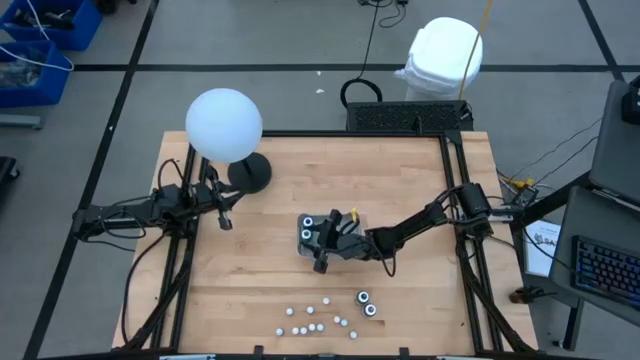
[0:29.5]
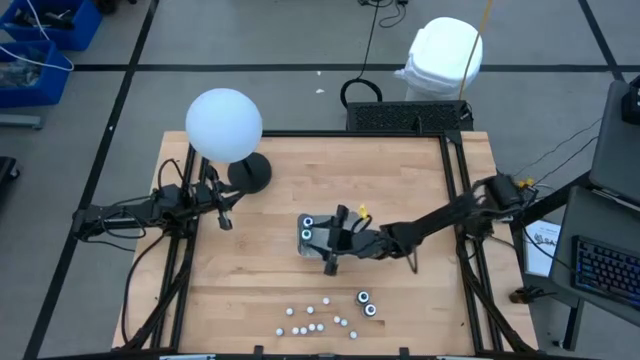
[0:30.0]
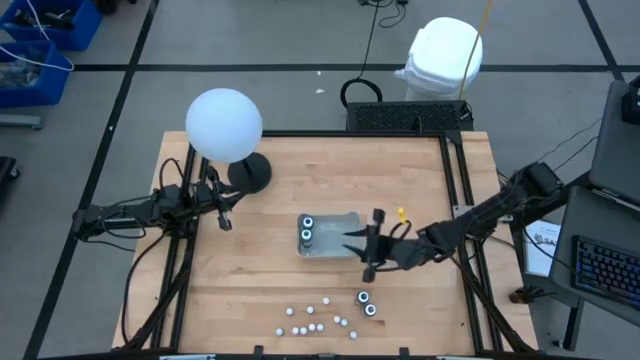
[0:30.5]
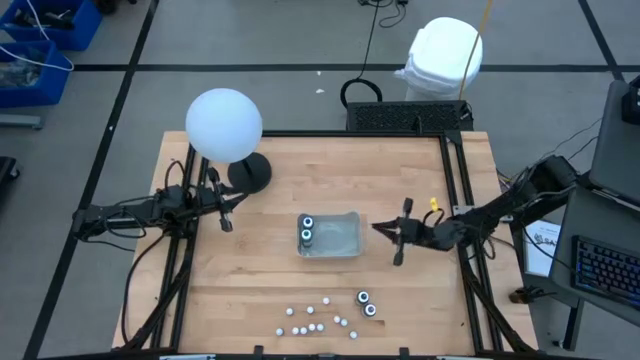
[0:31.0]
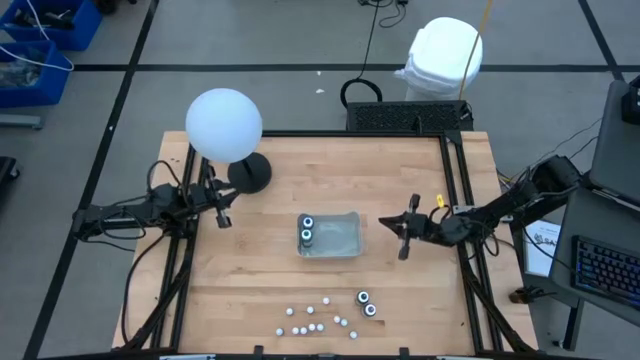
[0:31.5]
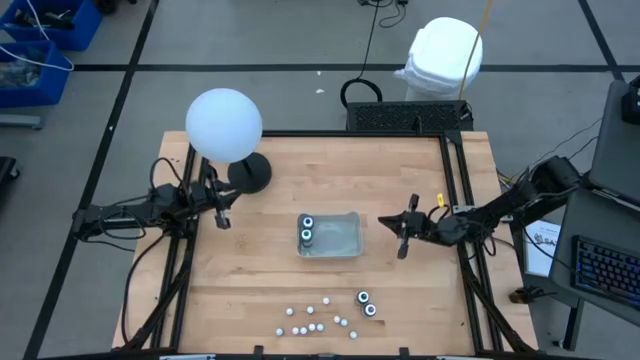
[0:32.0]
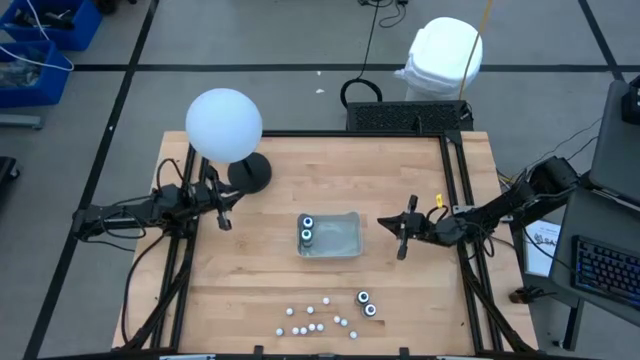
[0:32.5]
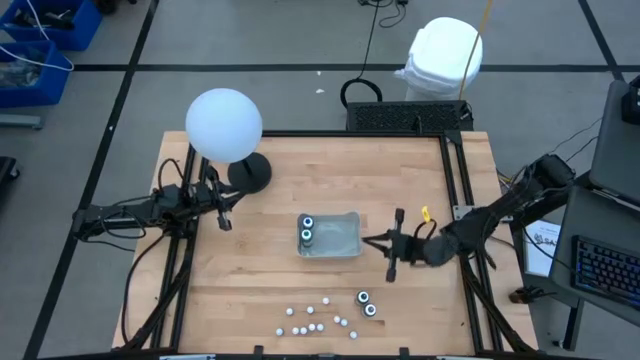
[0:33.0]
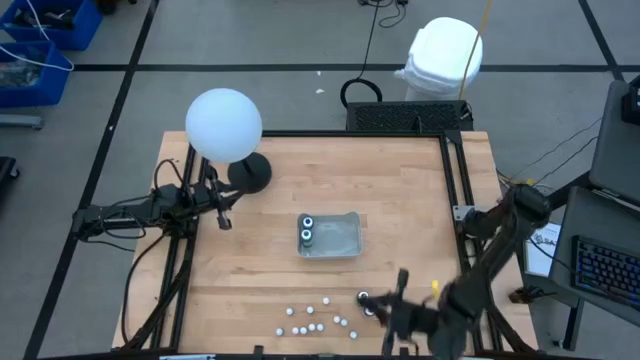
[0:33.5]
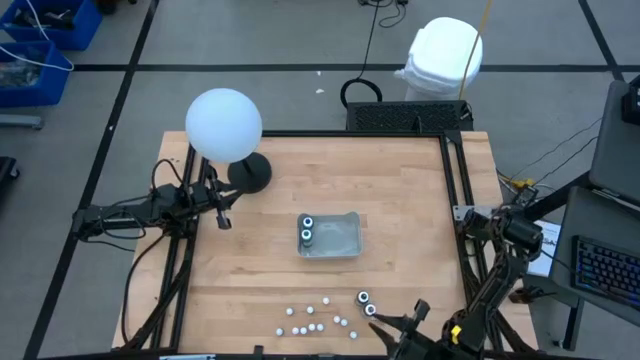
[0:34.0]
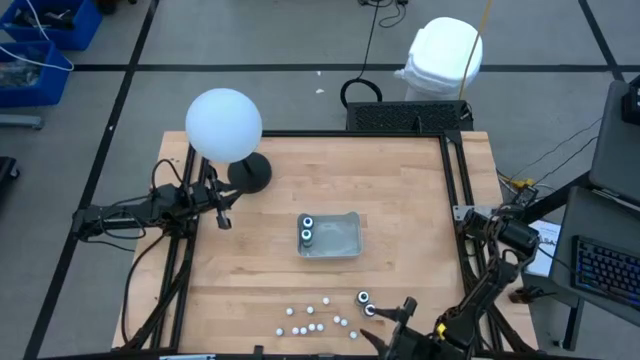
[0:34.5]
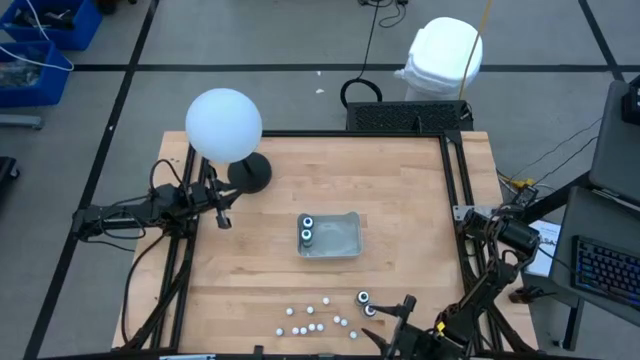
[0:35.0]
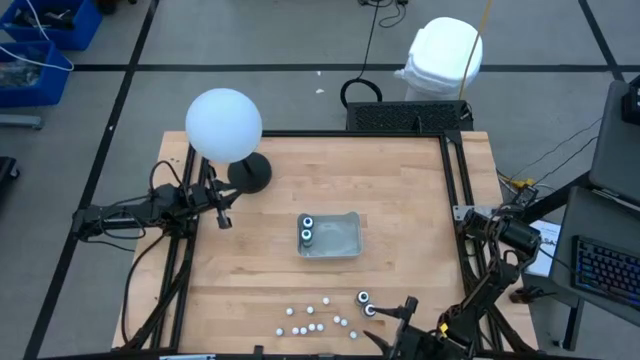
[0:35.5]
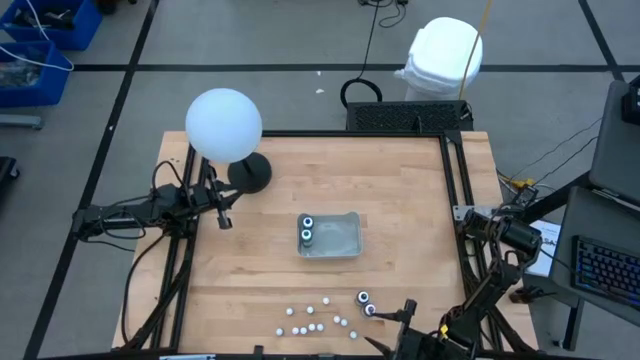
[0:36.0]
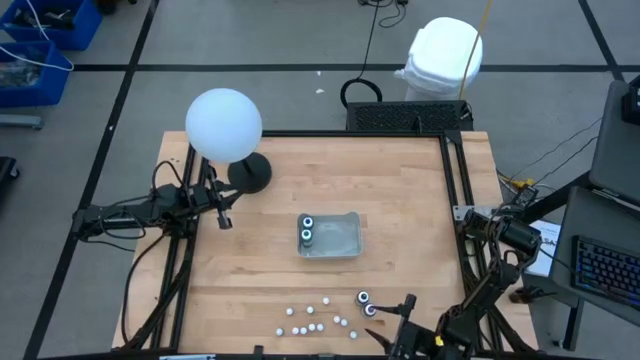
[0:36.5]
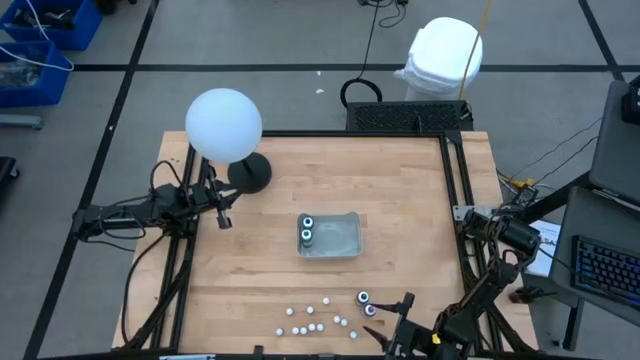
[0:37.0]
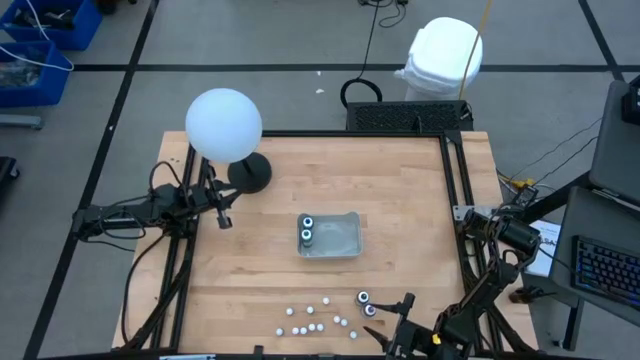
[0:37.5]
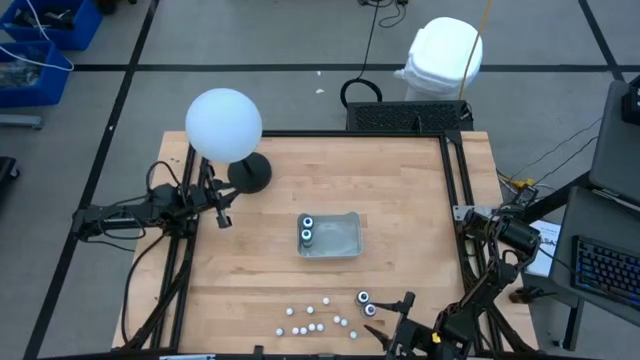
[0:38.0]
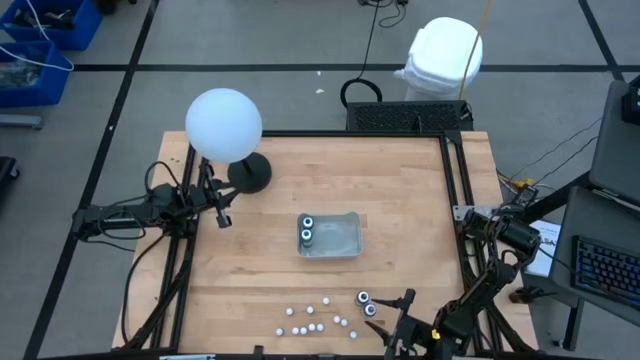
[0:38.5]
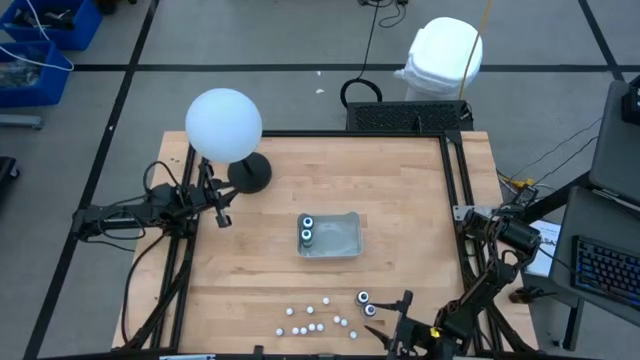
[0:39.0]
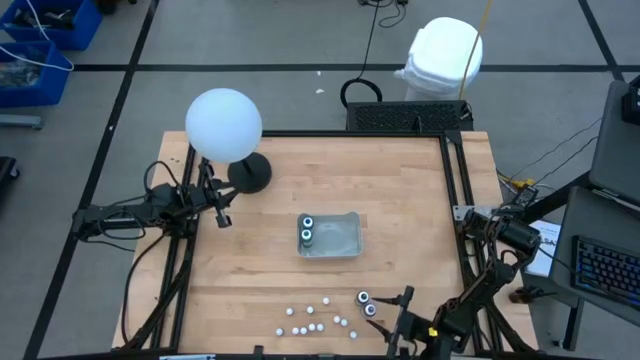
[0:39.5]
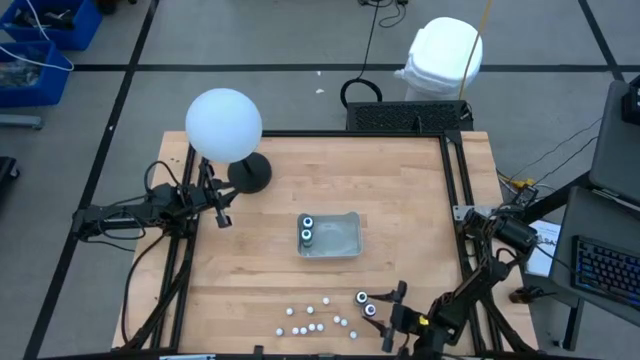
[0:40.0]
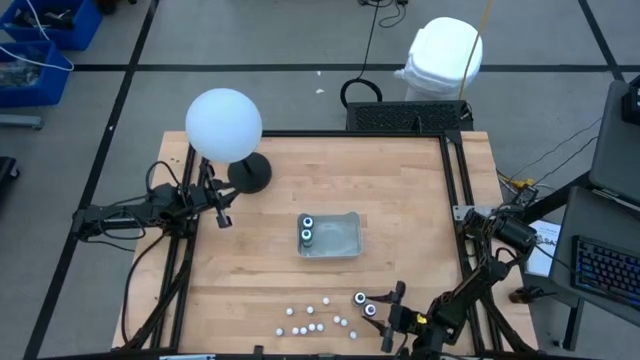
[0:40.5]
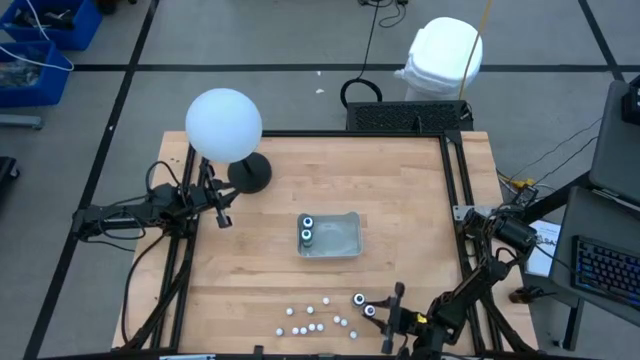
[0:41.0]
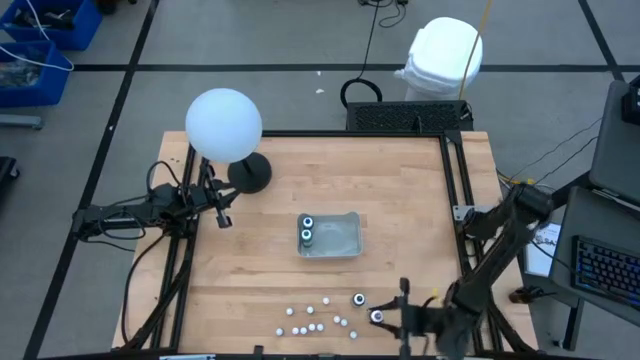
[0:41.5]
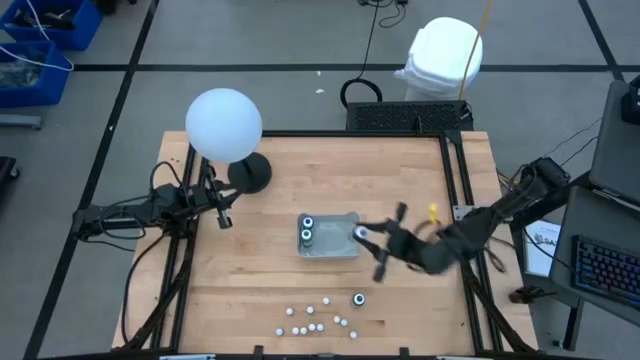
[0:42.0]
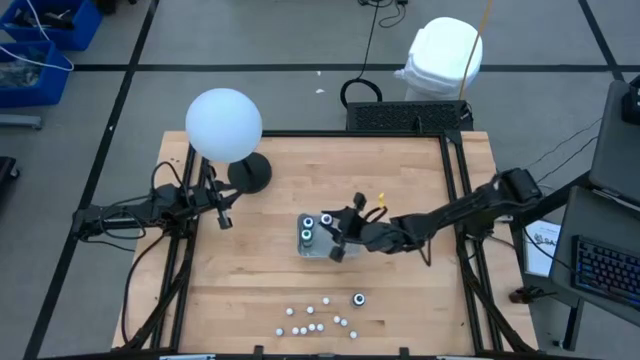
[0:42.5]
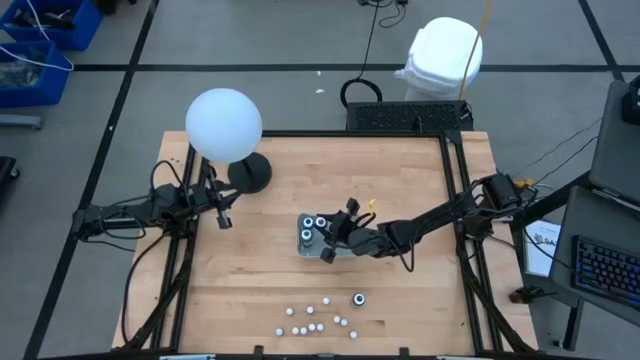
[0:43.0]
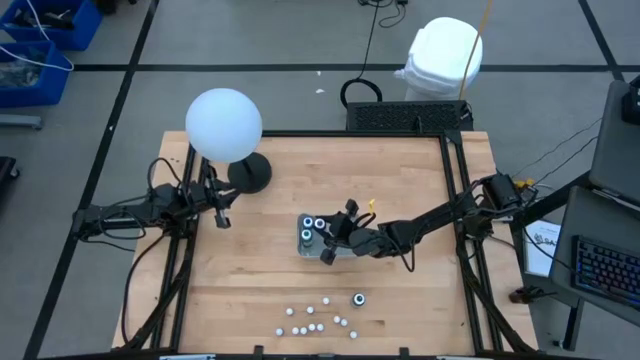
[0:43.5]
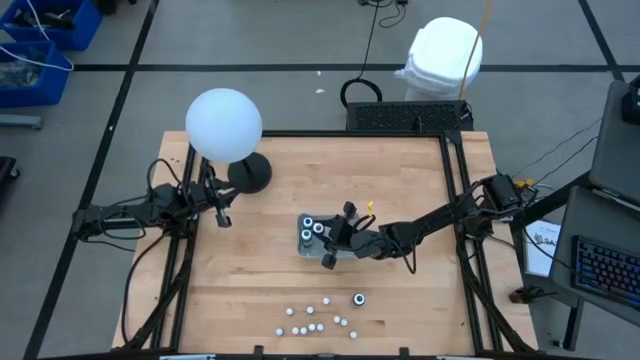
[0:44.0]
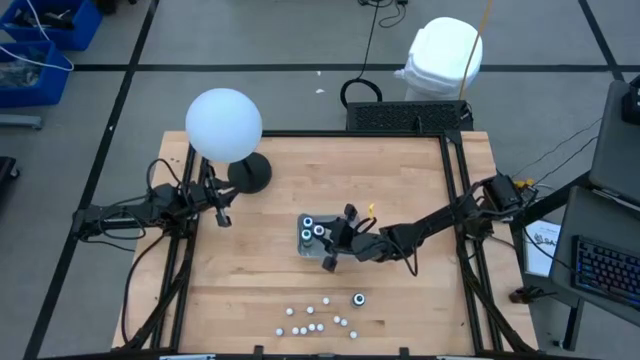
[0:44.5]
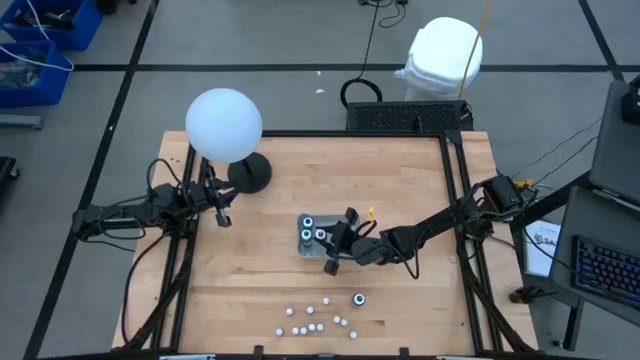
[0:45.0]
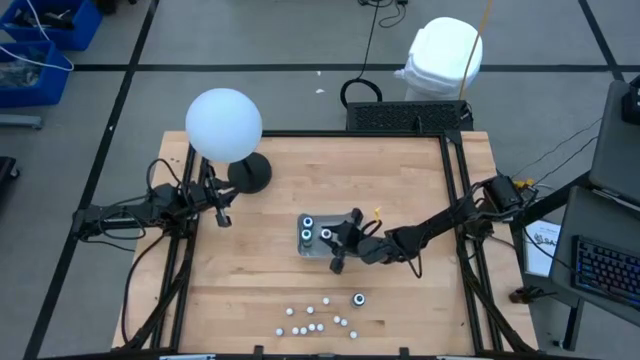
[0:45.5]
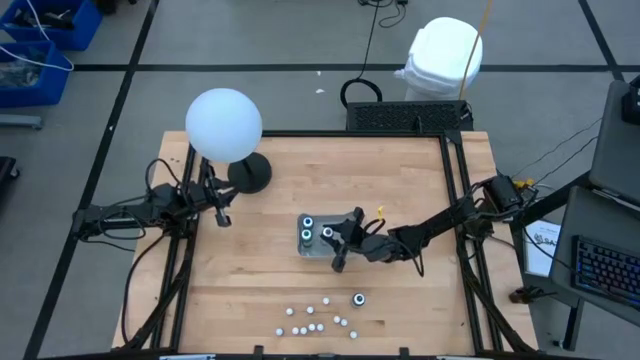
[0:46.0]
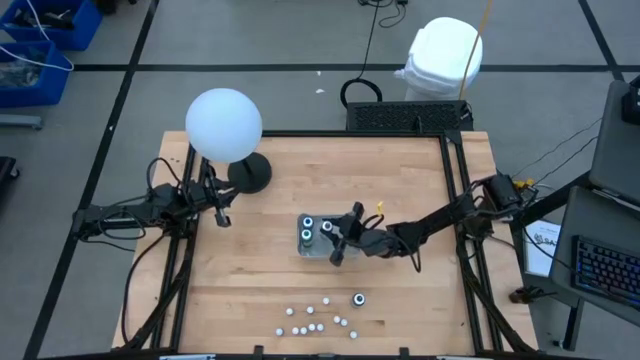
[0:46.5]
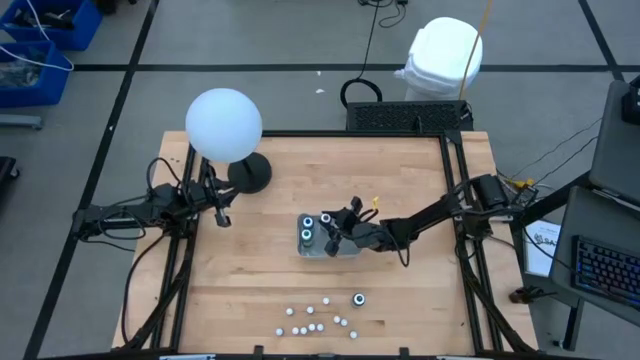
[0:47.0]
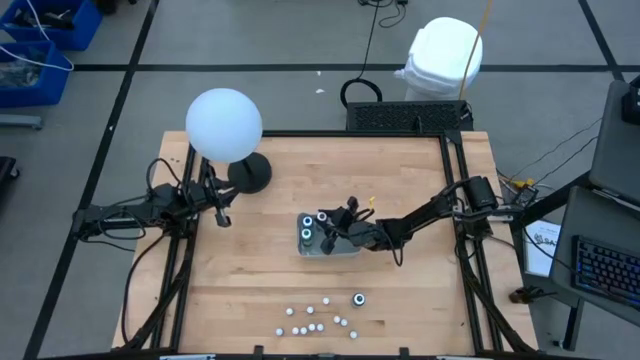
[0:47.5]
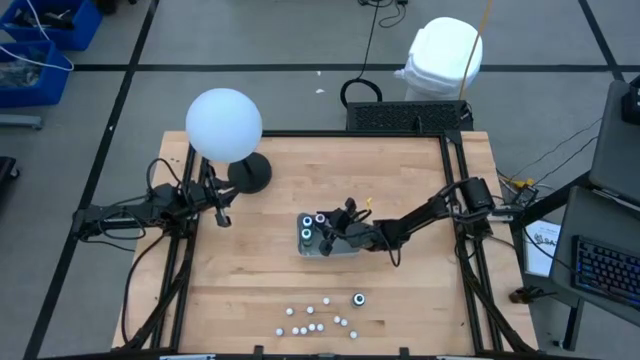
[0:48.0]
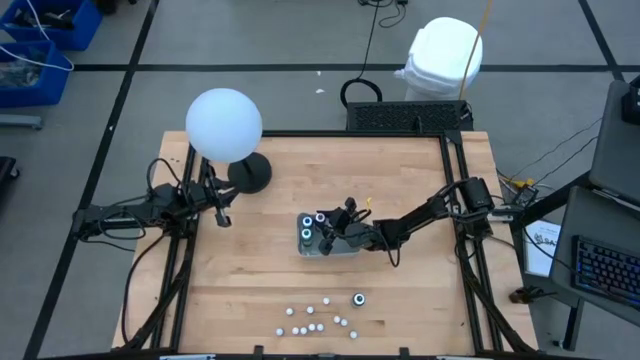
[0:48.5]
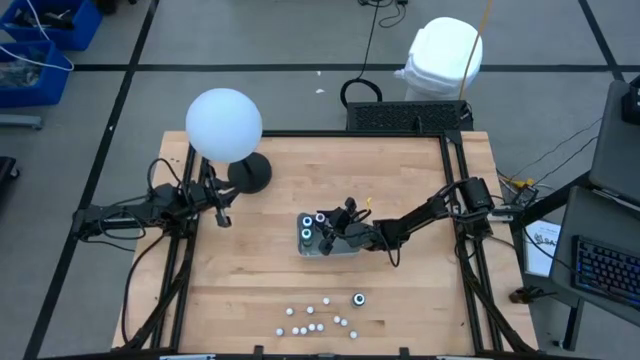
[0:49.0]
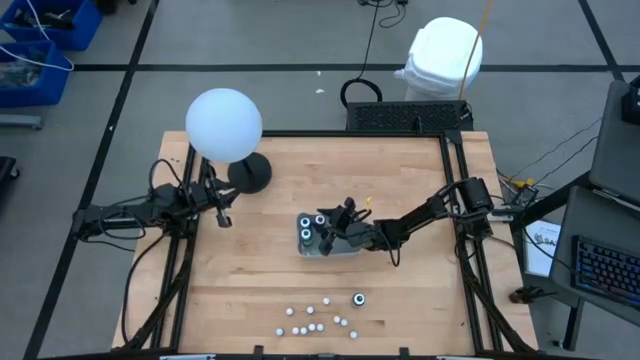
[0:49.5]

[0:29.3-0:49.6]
Task: Pick & Place food coloring
Put the large violet food coloring bottle into the gray bin

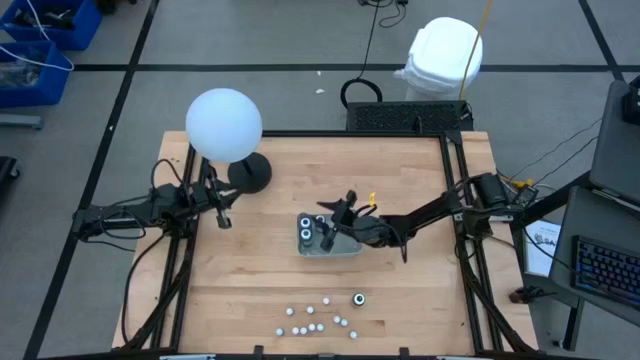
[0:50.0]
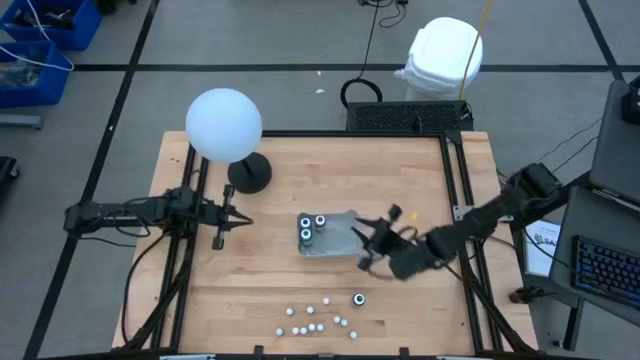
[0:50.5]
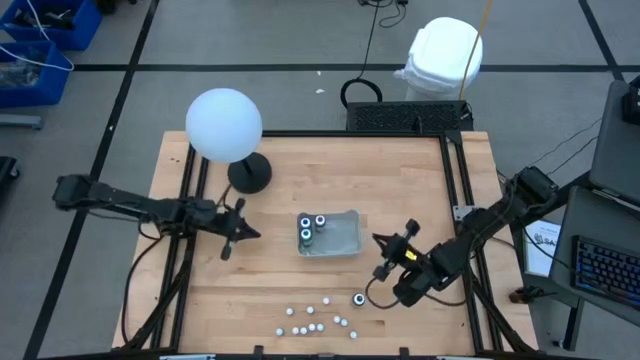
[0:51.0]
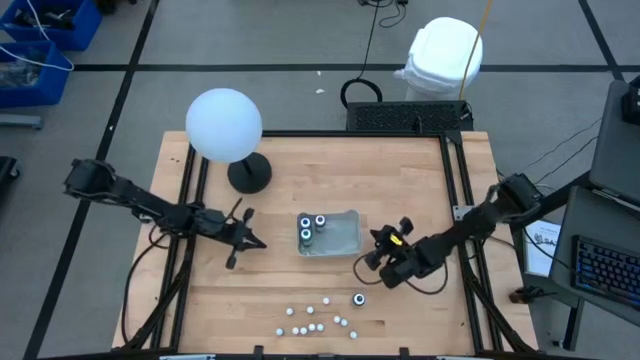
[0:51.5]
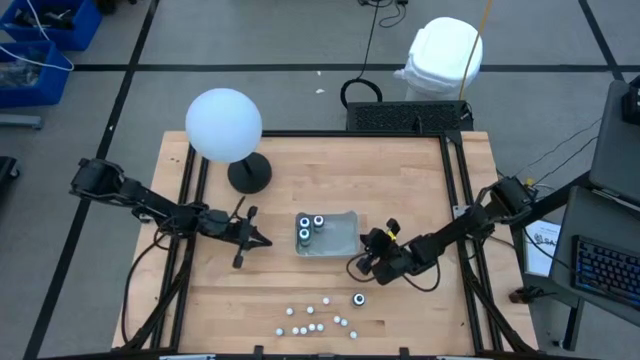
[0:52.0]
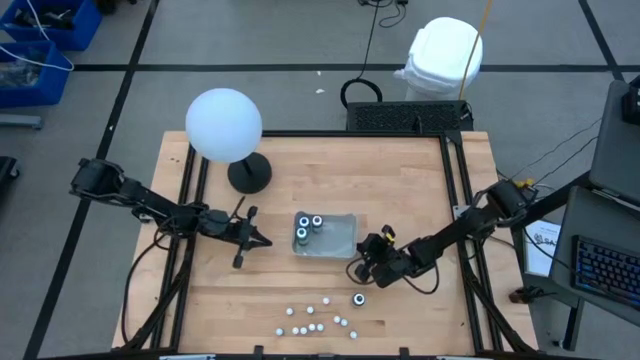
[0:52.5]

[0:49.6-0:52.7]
Adjust the gray bin
